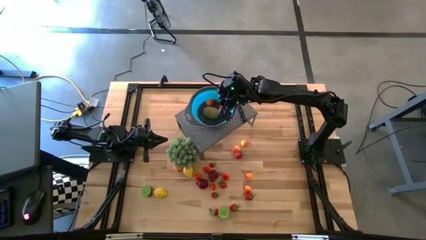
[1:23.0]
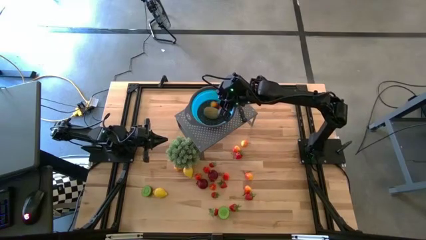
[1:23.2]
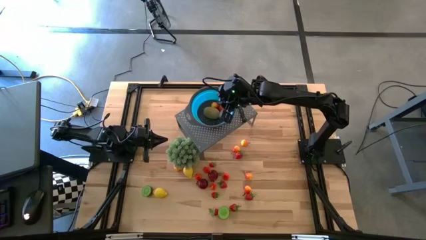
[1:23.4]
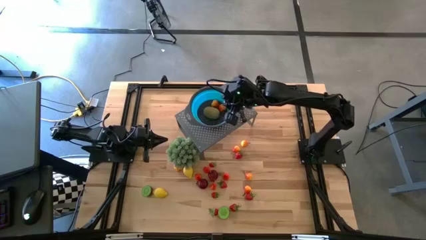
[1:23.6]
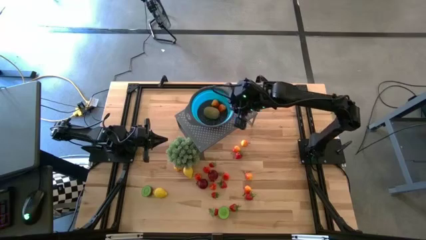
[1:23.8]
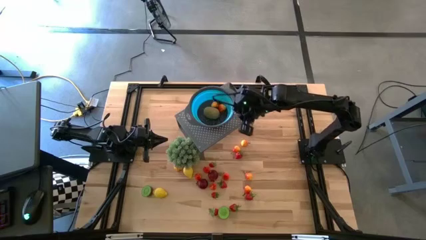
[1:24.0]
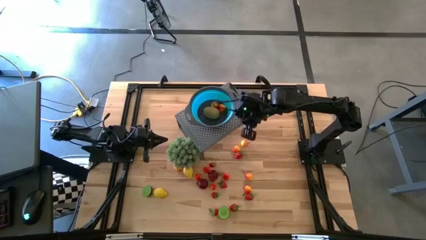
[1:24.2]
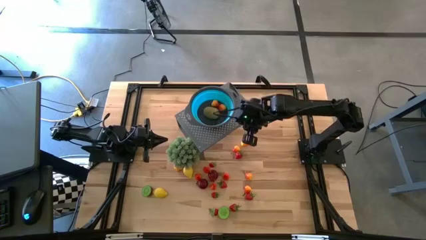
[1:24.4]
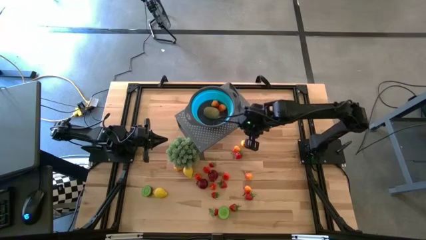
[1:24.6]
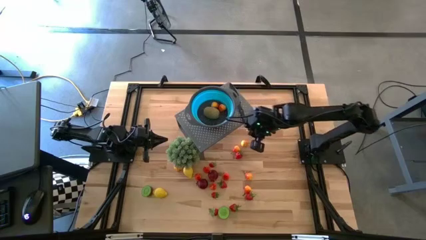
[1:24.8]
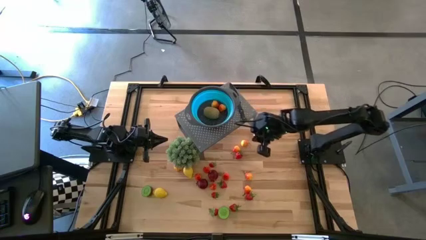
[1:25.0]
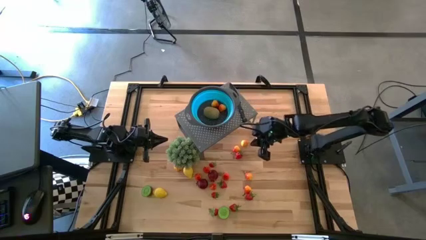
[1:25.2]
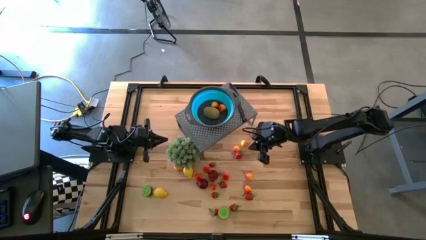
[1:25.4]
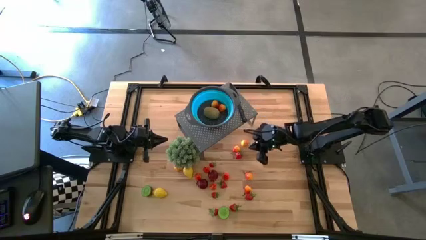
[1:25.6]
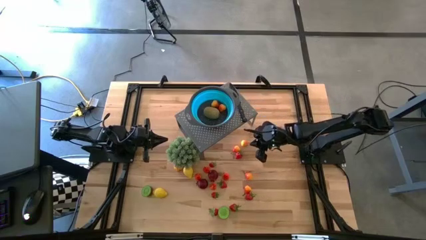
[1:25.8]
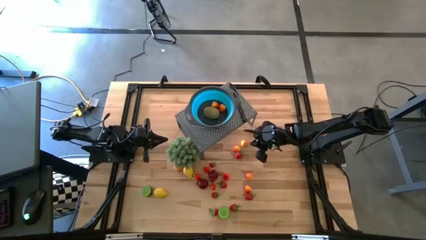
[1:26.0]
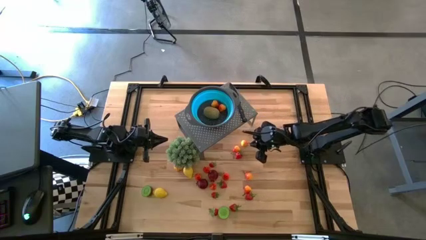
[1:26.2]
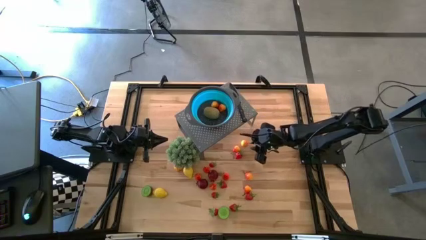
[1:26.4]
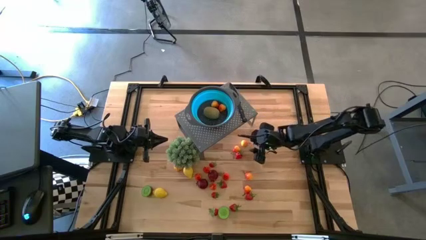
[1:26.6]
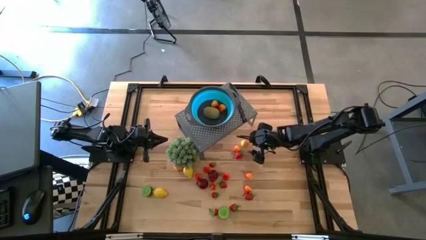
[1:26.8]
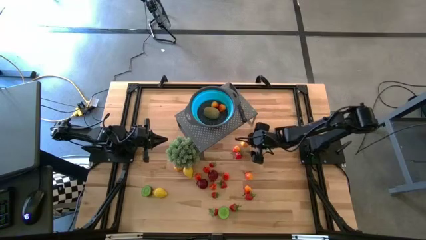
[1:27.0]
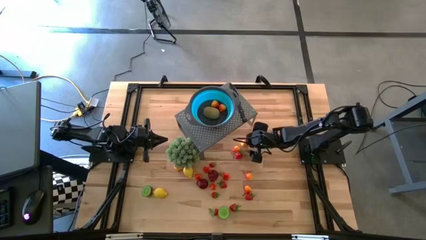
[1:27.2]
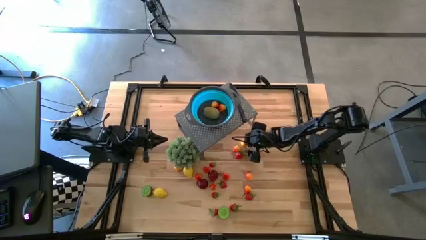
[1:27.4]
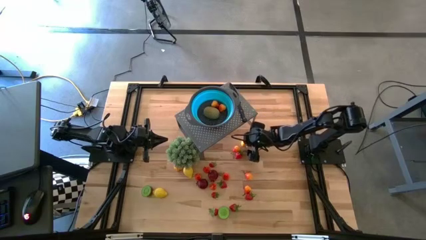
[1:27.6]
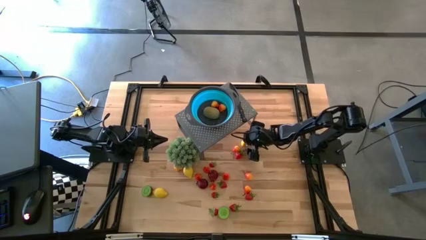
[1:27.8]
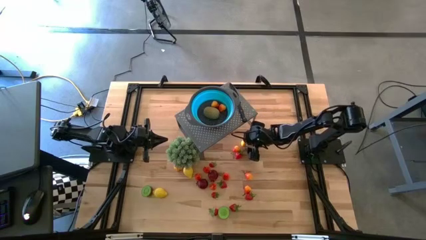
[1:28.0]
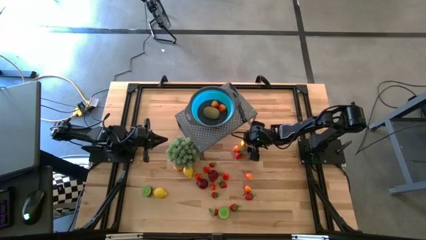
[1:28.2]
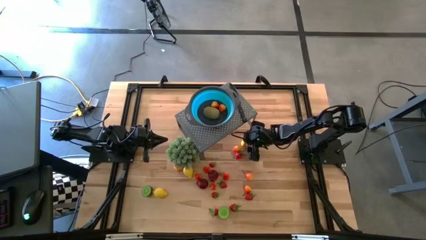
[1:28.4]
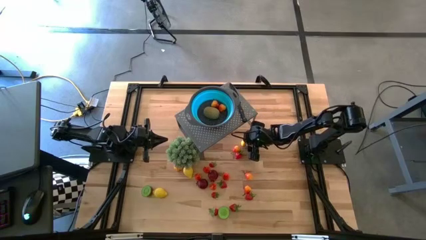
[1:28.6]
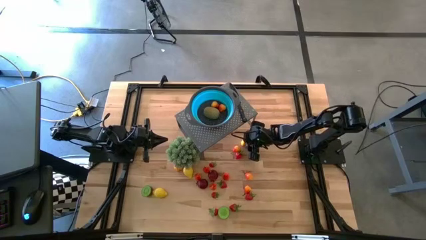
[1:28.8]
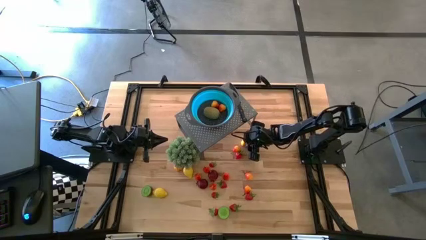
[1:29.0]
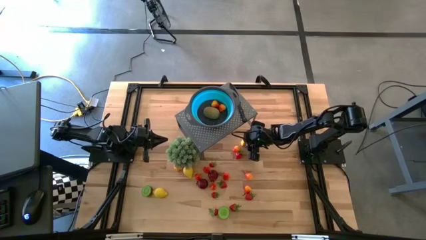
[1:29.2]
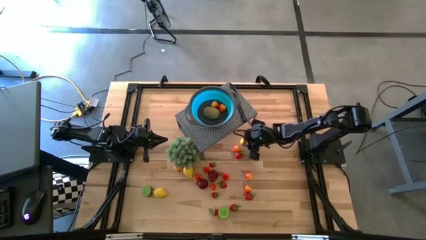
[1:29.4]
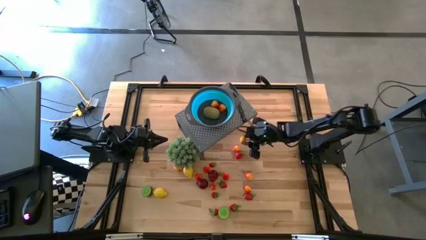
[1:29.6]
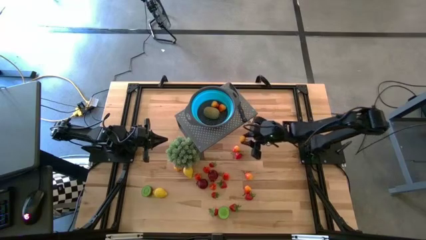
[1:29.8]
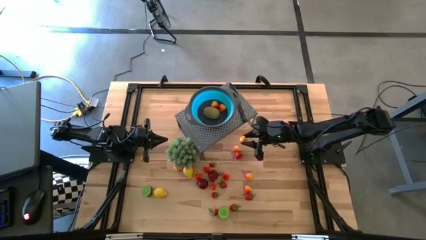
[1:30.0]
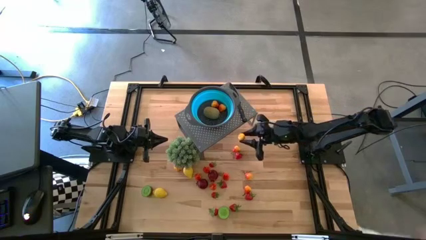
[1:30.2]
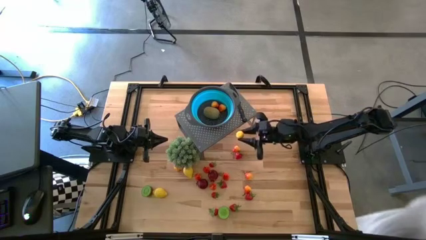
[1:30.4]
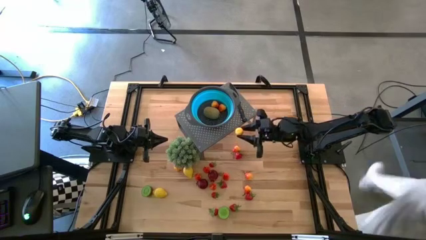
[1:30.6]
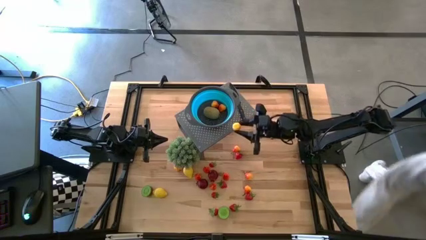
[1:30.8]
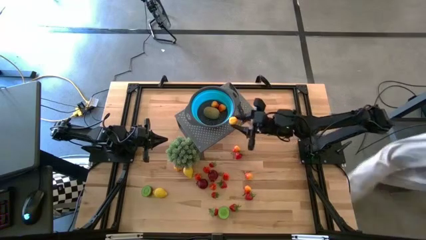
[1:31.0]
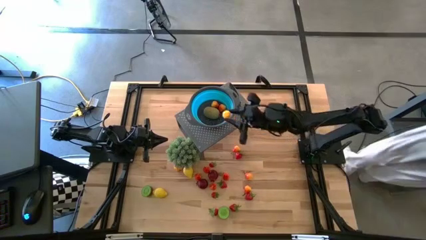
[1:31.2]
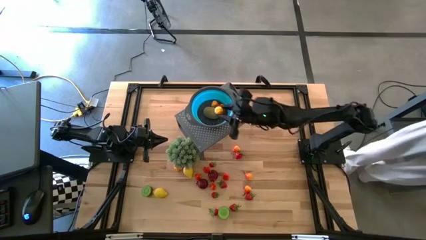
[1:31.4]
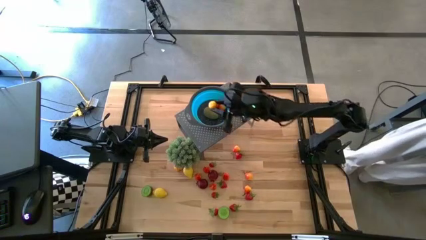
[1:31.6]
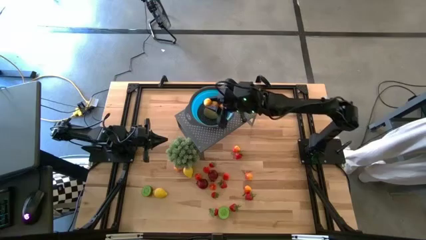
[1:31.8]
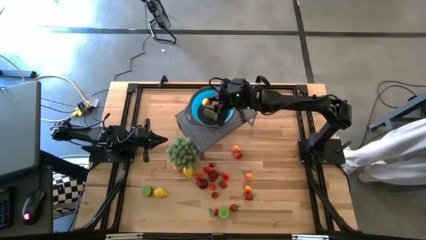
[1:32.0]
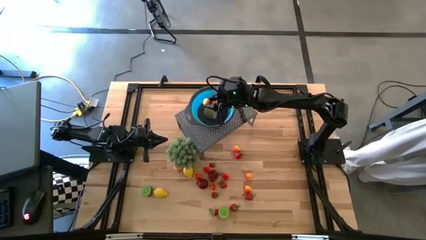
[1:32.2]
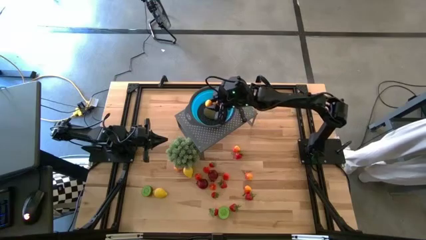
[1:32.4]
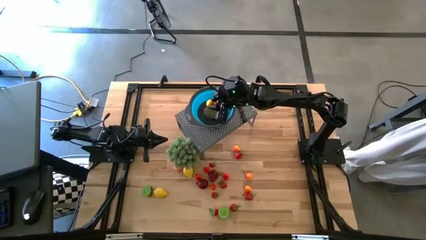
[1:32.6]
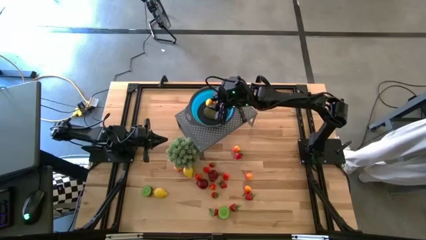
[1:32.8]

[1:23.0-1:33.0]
Task: Pick & Place Fruit
Put the pear into the blue strainer bowl on the shelf
